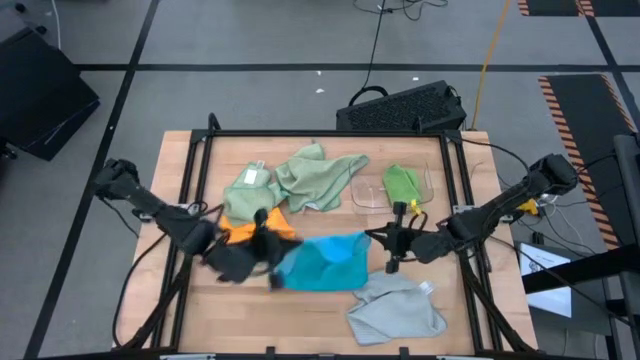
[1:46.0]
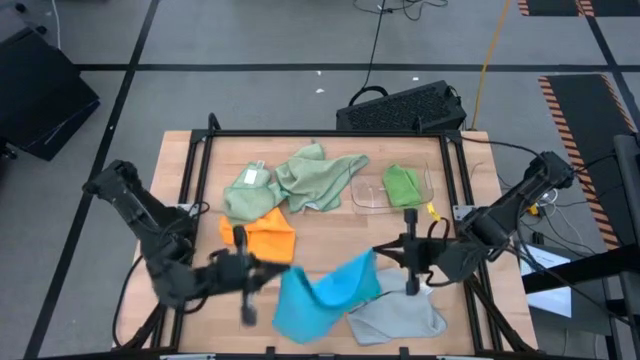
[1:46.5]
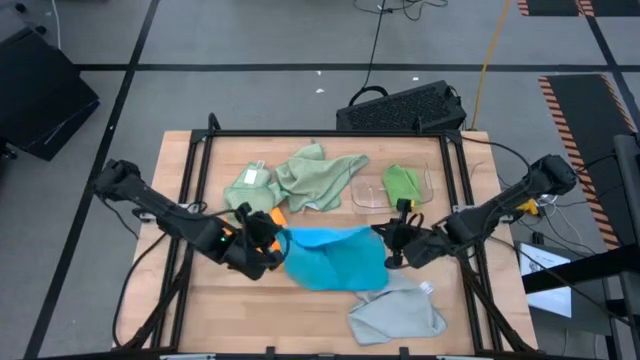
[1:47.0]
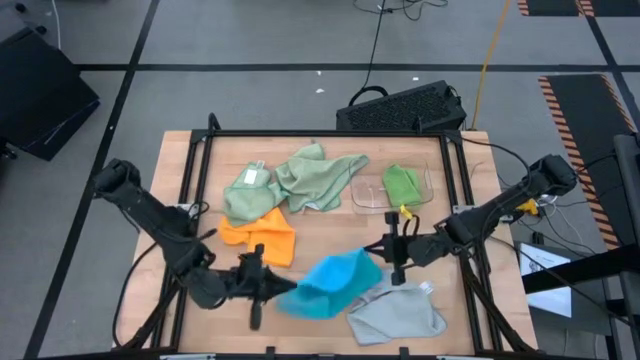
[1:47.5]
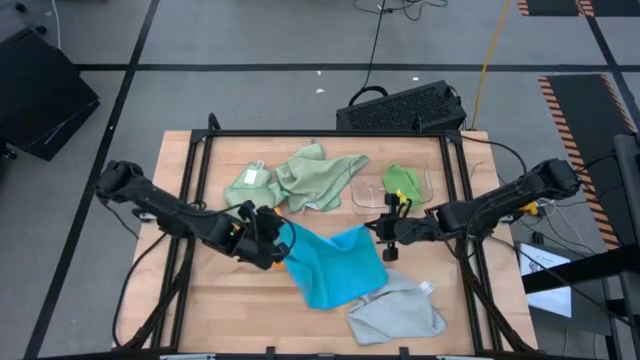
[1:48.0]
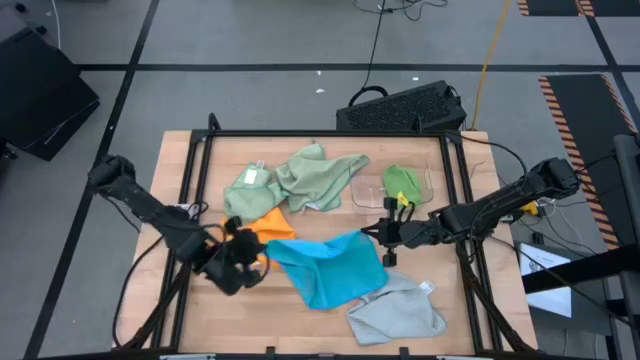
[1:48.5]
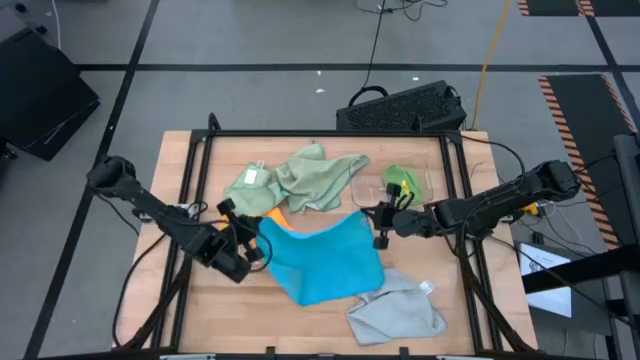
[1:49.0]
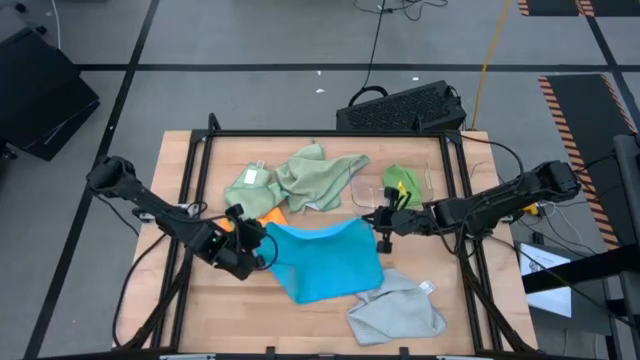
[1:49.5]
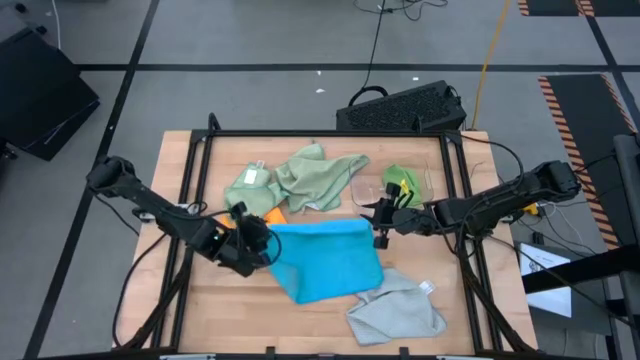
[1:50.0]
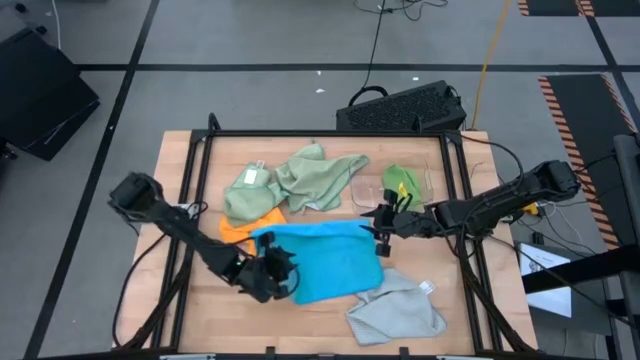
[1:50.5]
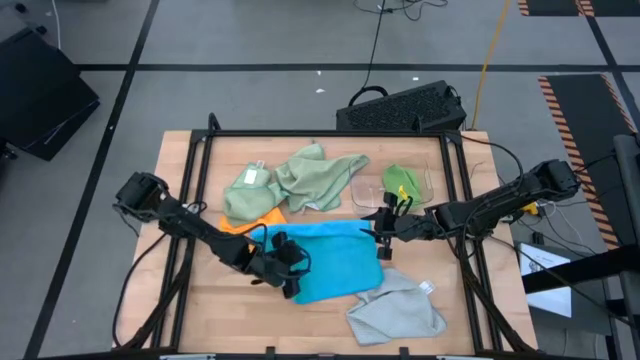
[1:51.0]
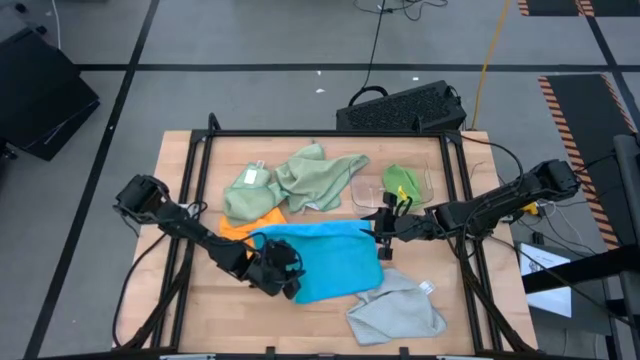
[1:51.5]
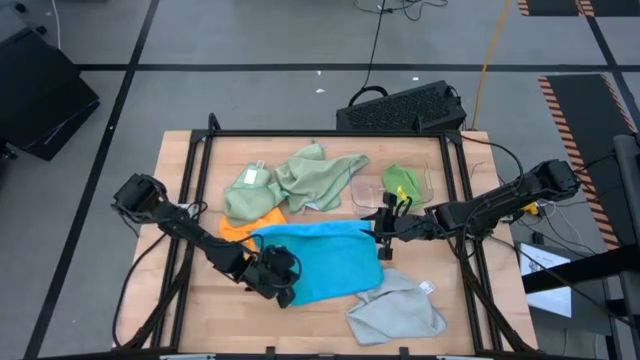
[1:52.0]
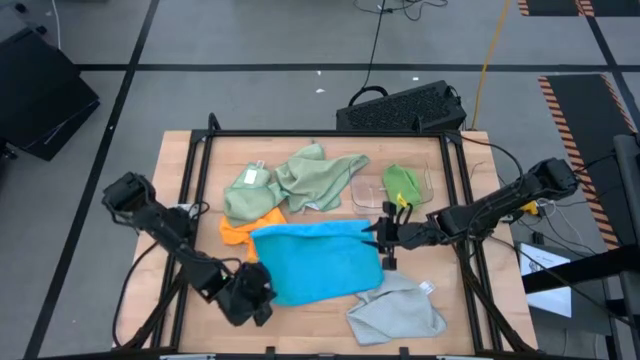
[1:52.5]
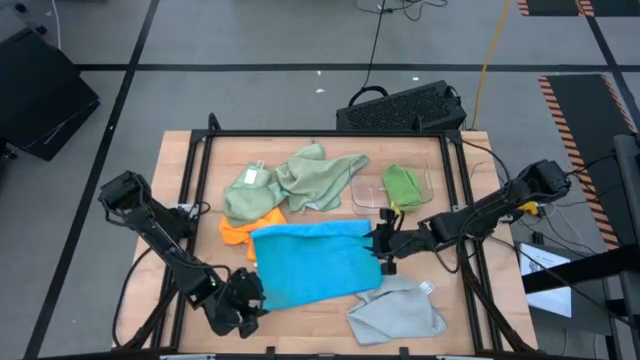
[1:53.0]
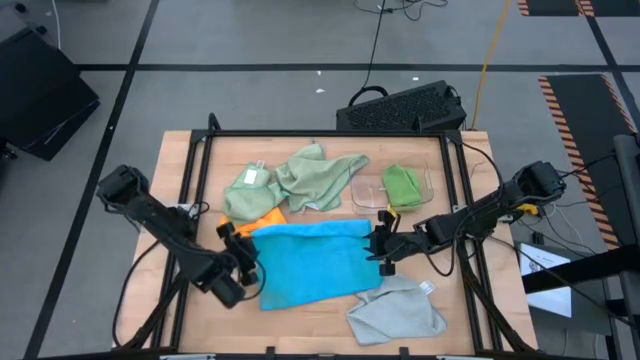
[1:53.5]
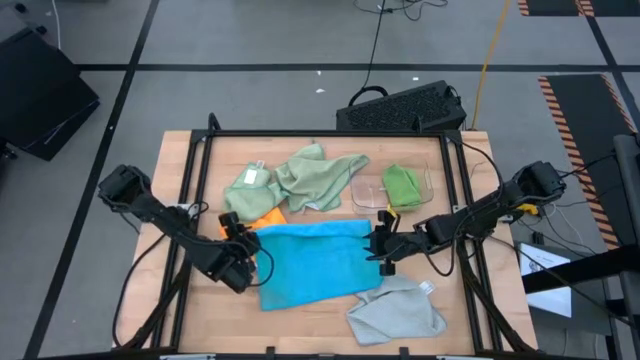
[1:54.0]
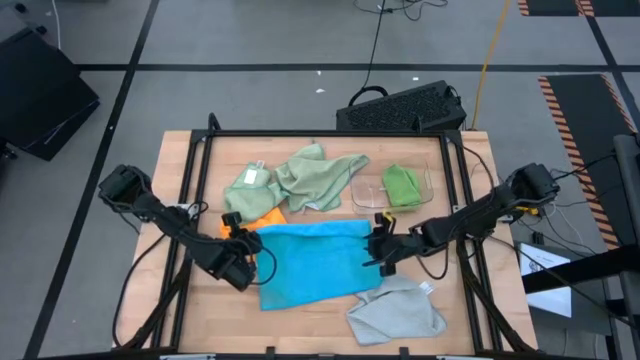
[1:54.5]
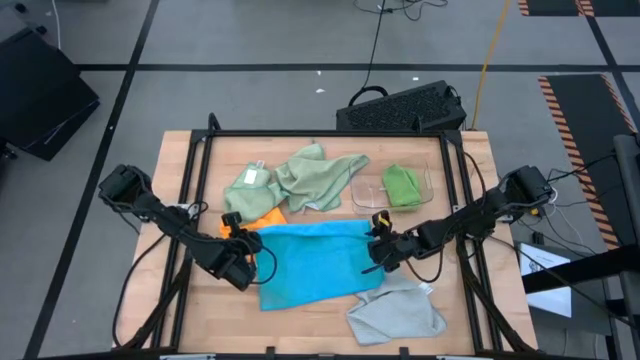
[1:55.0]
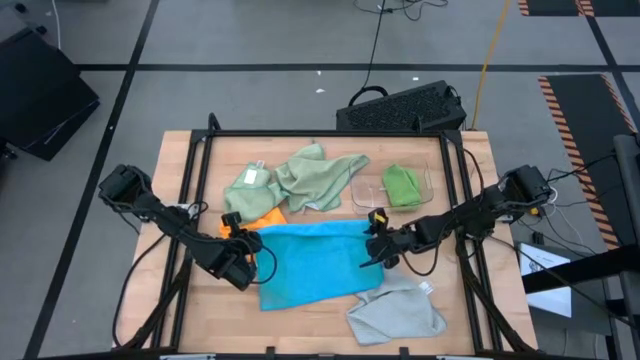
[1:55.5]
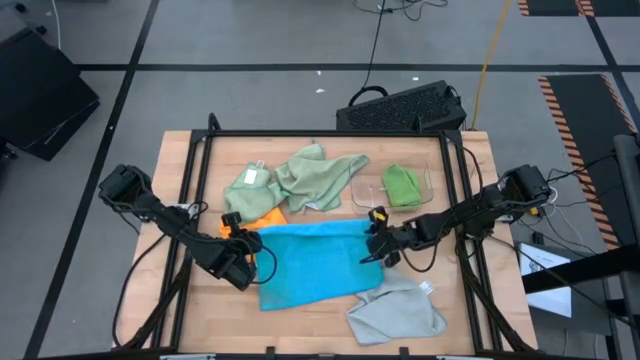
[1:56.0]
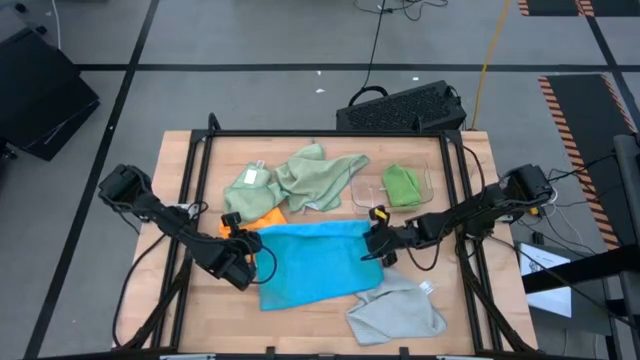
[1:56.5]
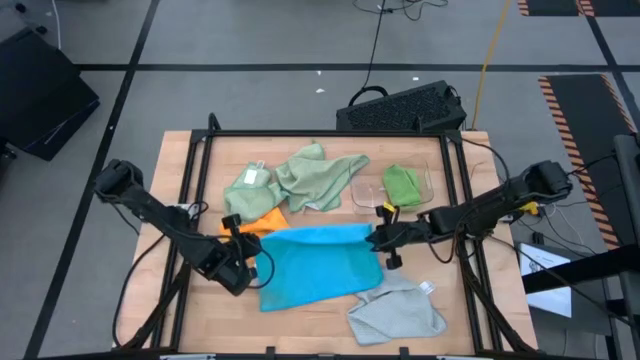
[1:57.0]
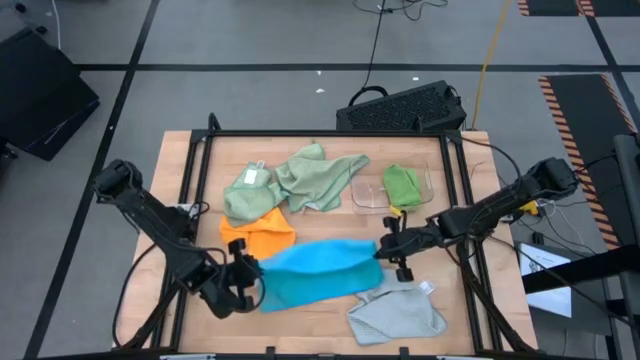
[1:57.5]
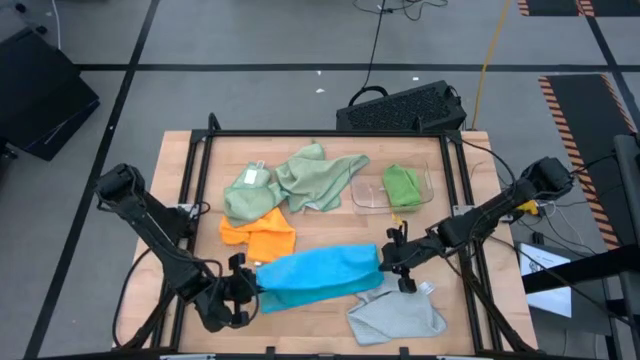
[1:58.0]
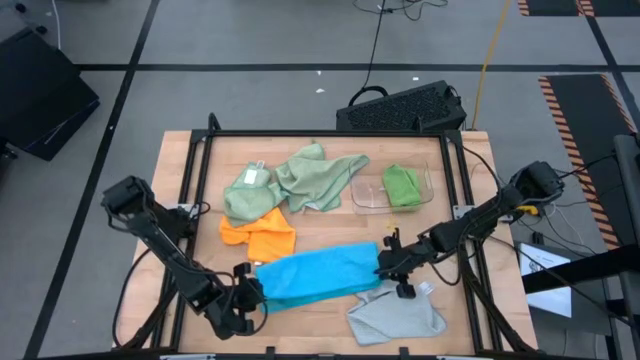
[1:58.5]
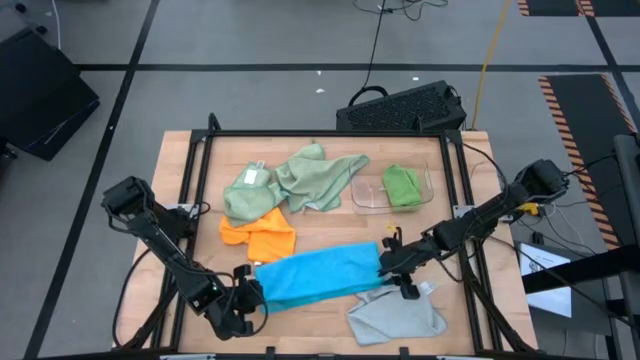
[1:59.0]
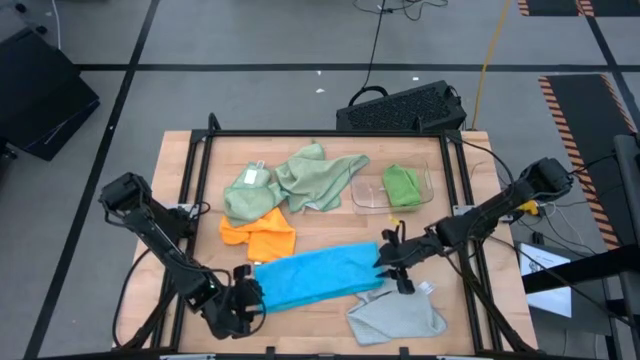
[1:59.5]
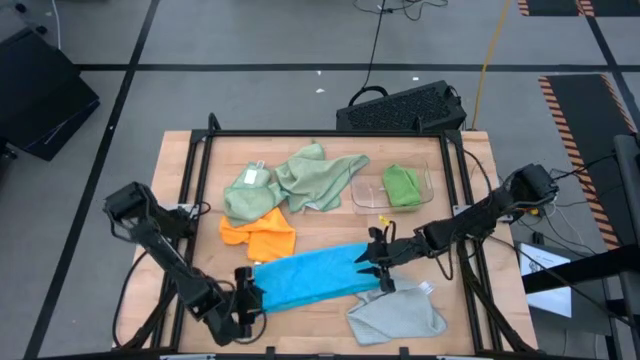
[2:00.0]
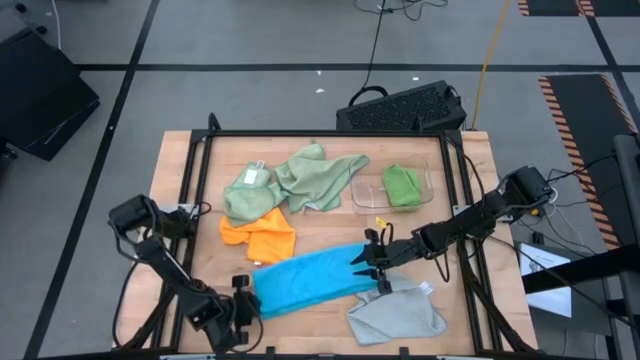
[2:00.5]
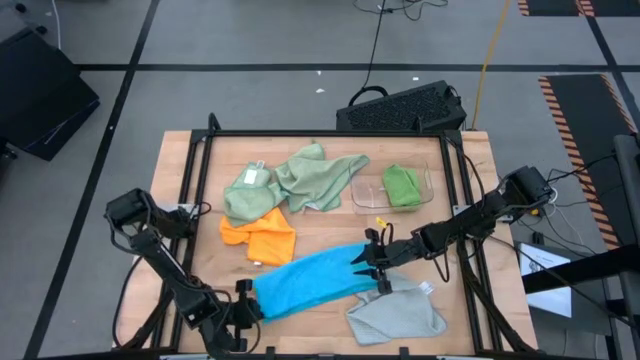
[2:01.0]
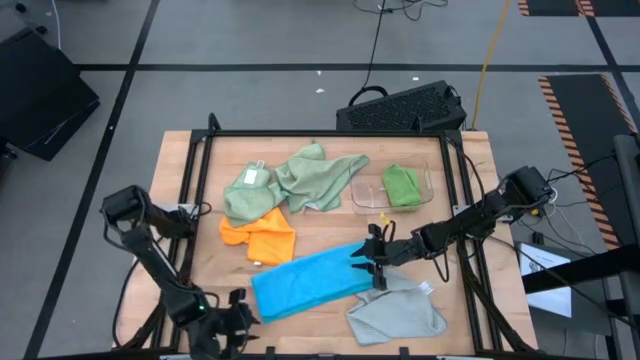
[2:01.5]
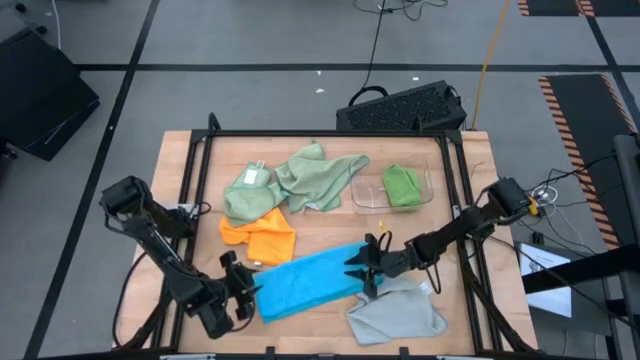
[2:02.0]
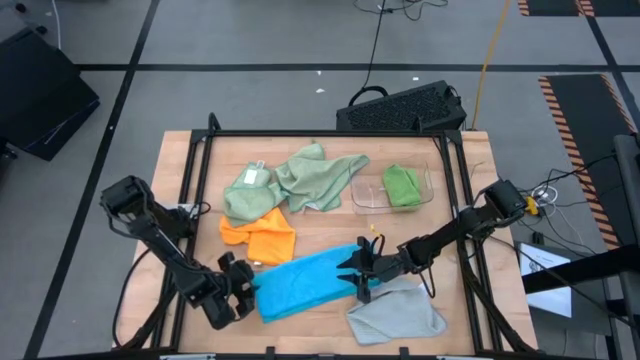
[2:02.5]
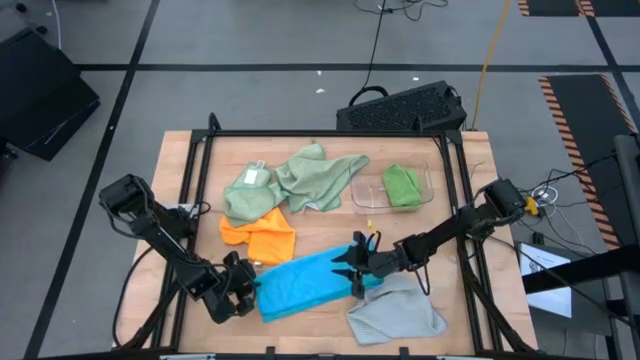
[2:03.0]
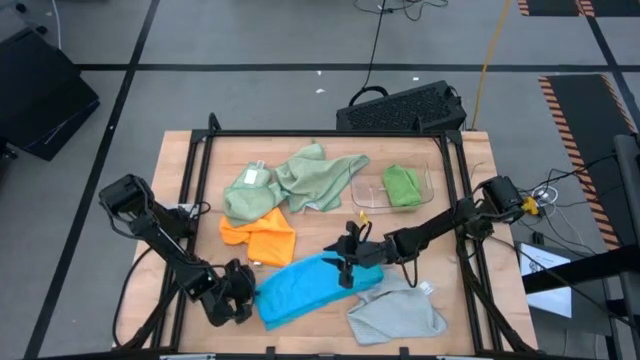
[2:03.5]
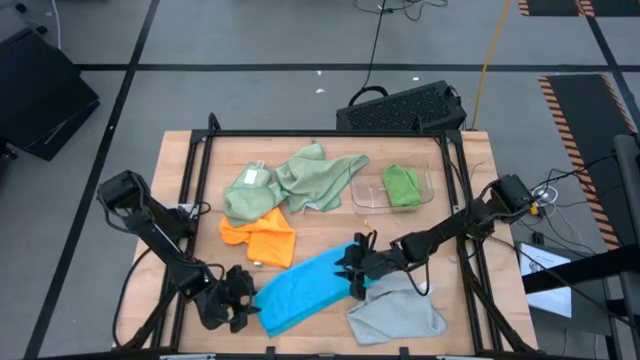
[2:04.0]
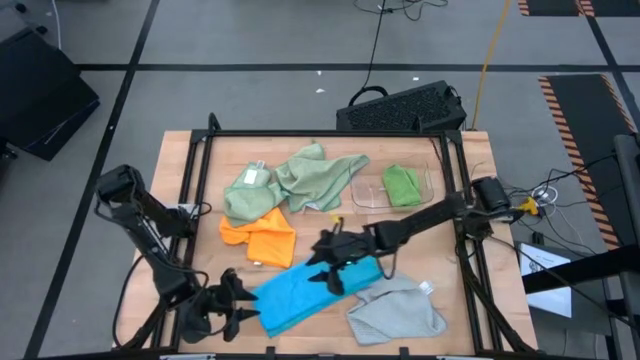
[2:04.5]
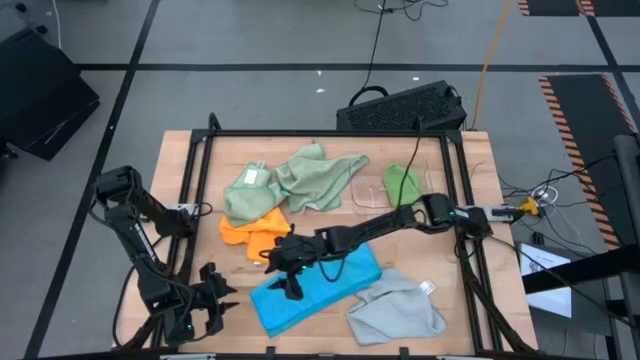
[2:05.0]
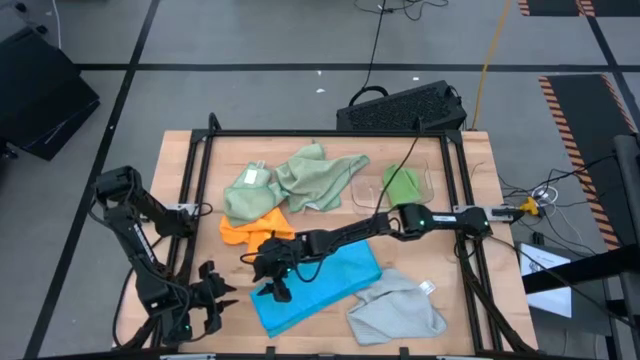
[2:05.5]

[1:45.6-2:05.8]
Task: Fold microfiber towels
Fold the blue microfiber cloth

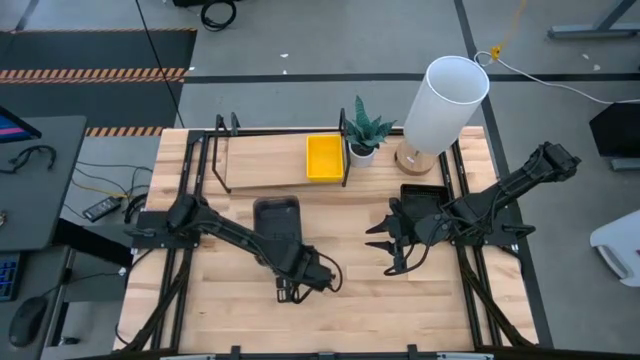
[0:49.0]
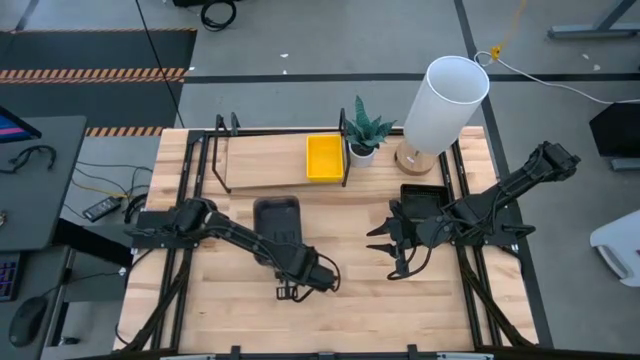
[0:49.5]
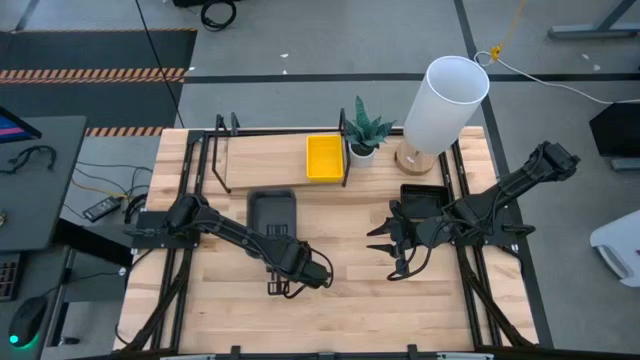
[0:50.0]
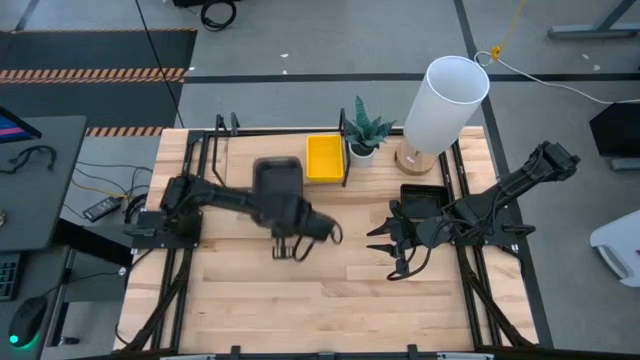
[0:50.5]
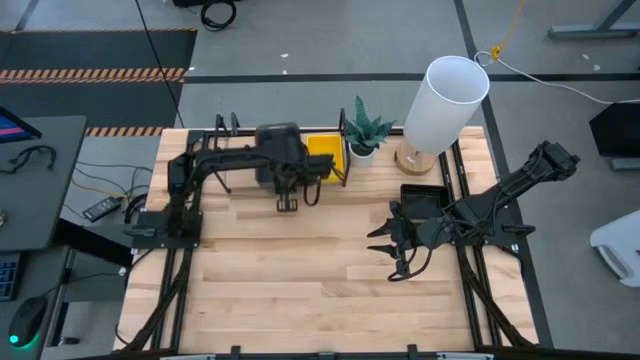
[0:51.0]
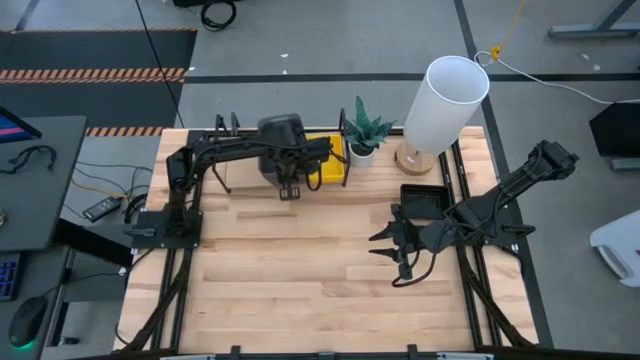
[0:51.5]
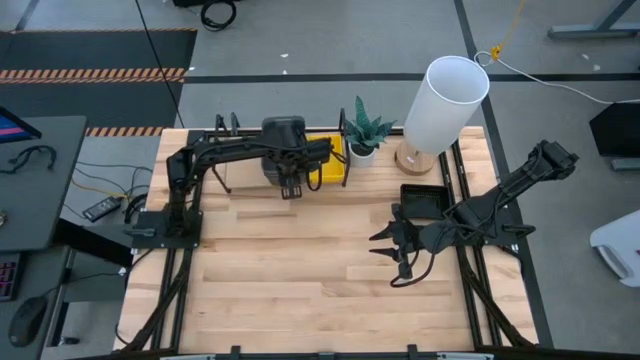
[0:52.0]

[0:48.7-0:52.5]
Task: Stack baskets on shelf by color
Put the gray bins on the shelf
